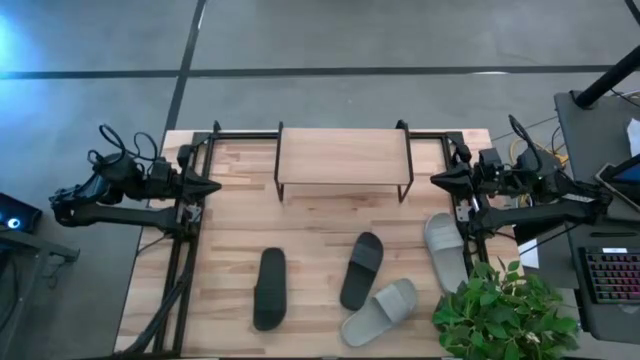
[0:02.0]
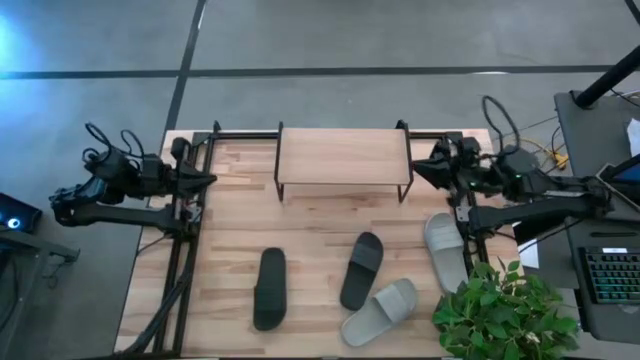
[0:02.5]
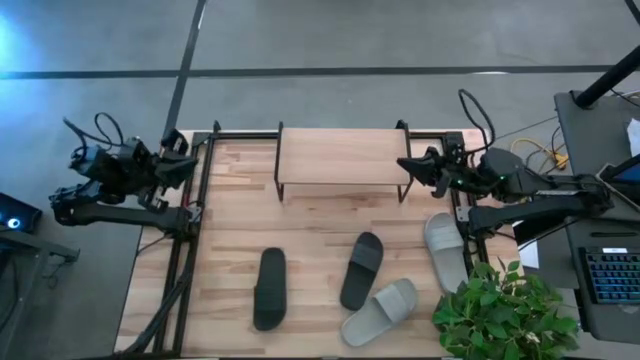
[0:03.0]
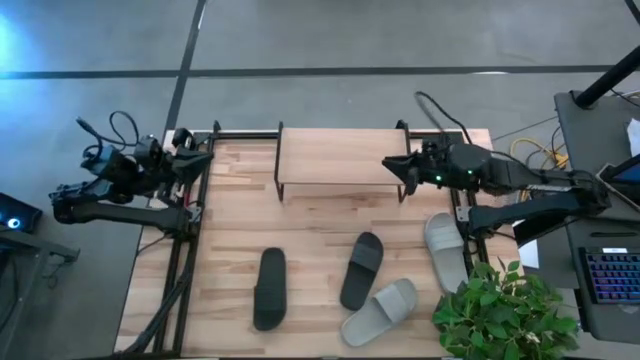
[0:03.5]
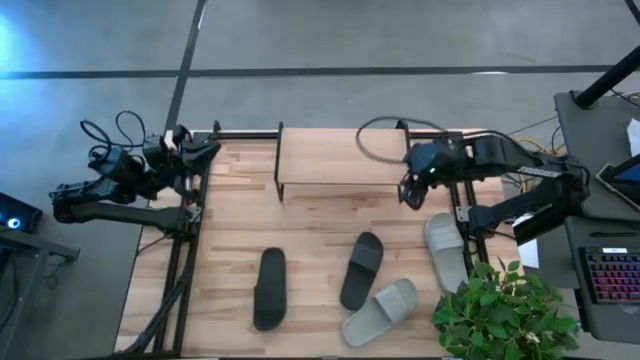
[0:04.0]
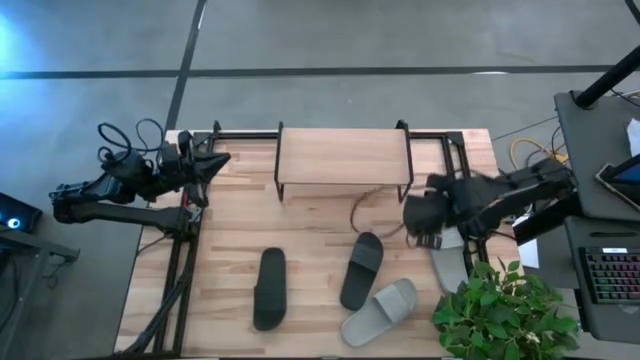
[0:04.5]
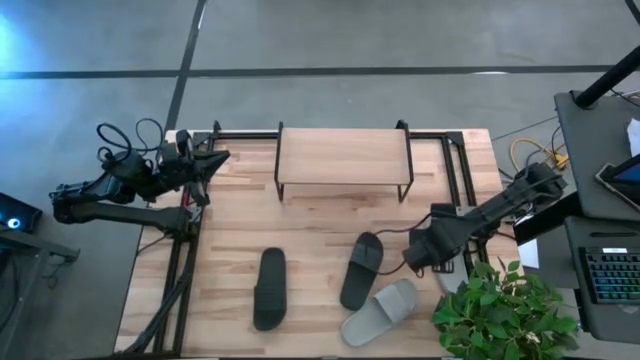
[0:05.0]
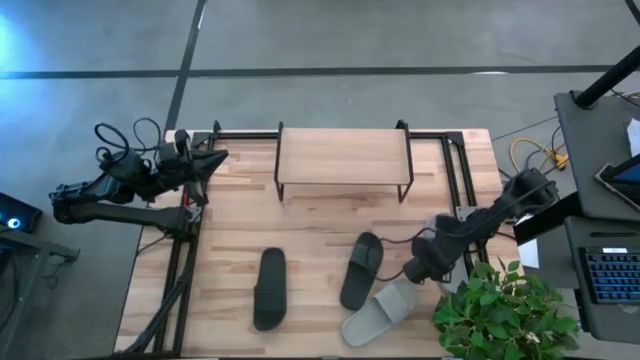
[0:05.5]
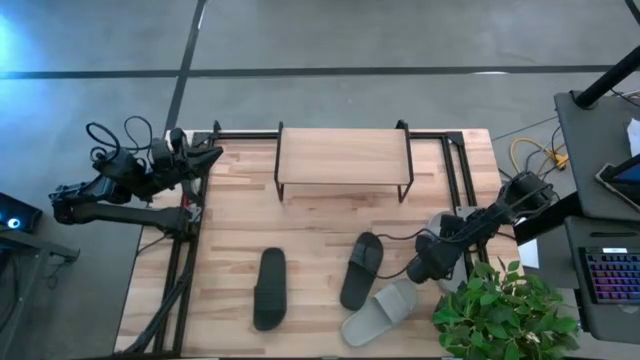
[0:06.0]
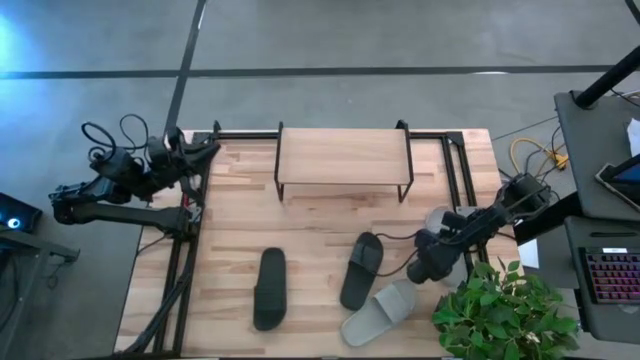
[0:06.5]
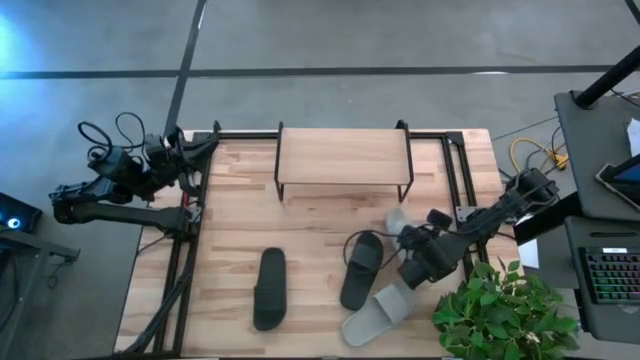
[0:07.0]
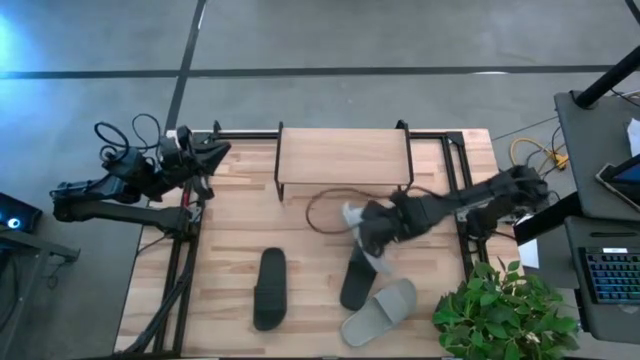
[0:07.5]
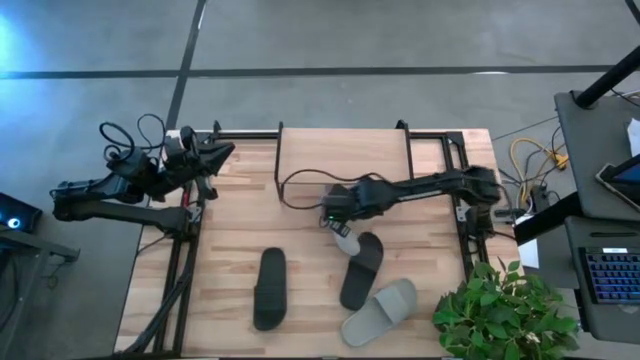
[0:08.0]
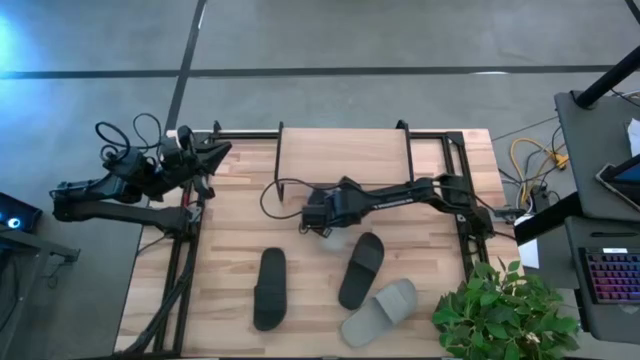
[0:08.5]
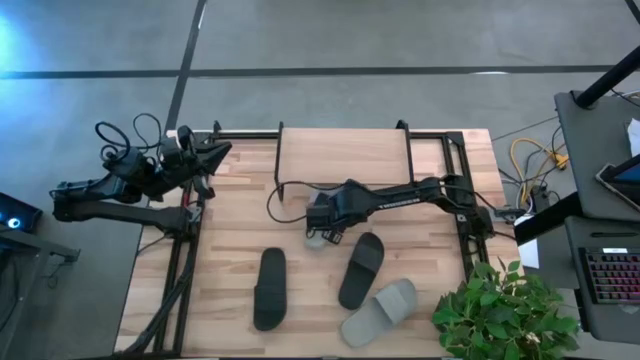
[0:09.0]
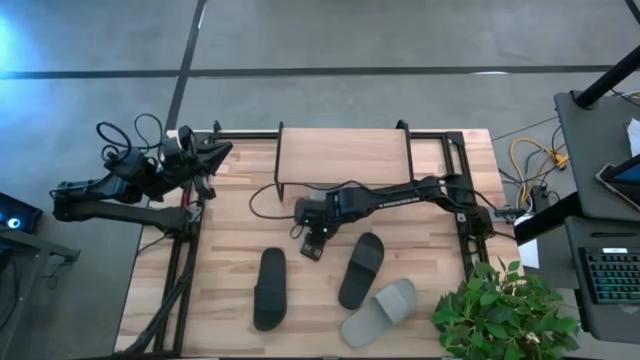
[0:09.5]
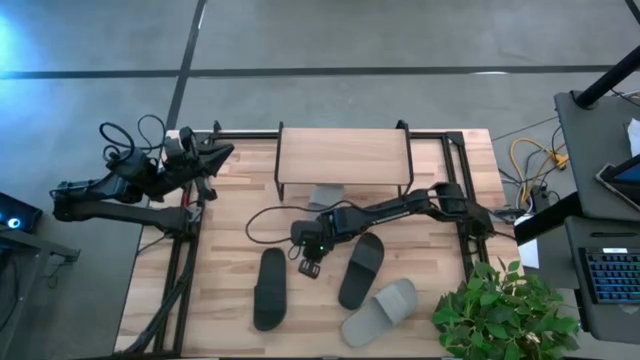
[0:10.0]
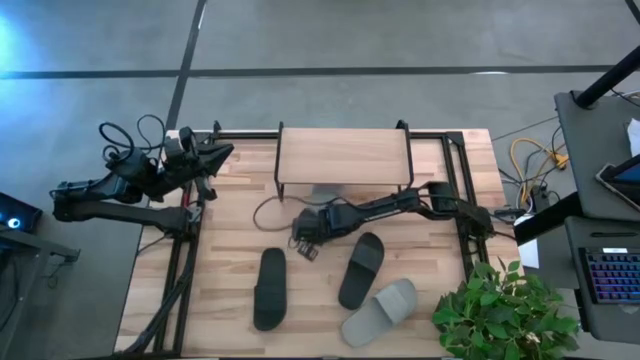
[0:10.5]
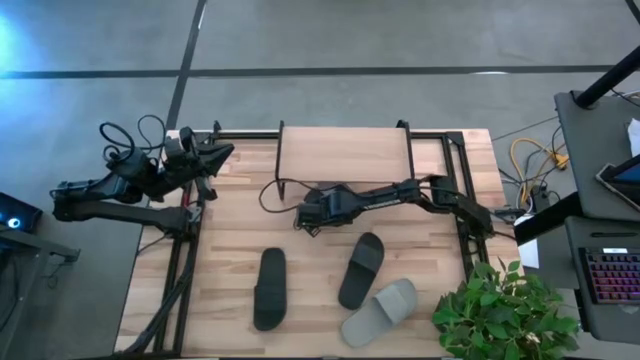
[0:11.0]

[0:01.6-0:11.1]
Task: Pick and place slides into the shelf
Put the right gray slide under the shelf

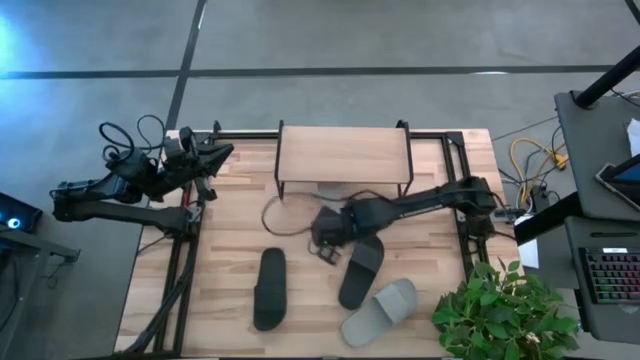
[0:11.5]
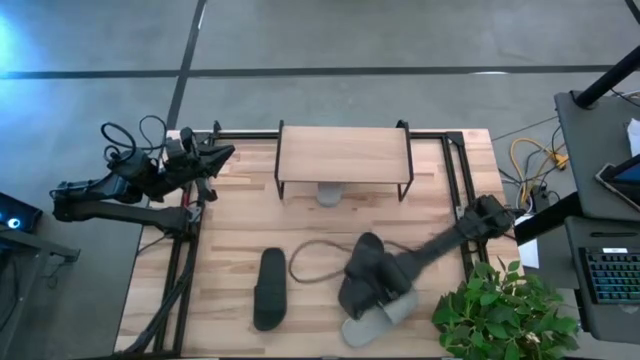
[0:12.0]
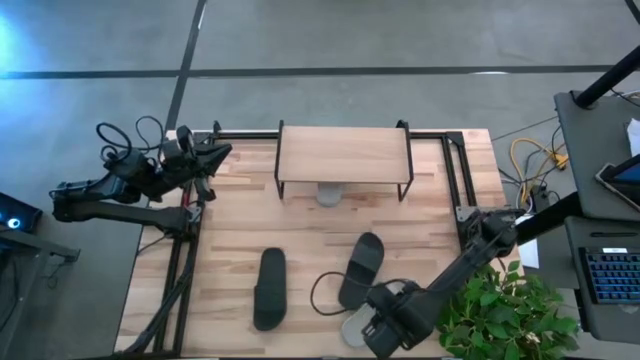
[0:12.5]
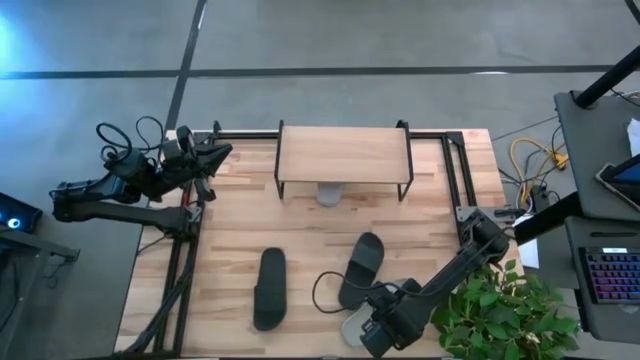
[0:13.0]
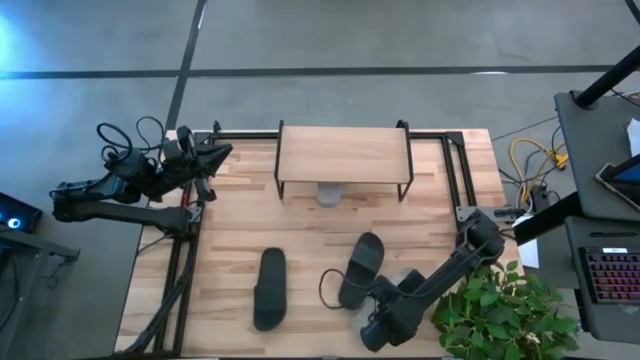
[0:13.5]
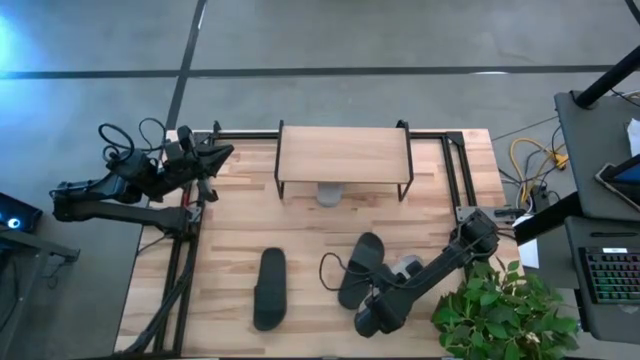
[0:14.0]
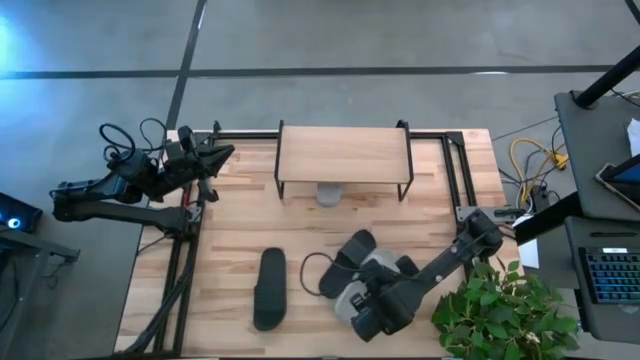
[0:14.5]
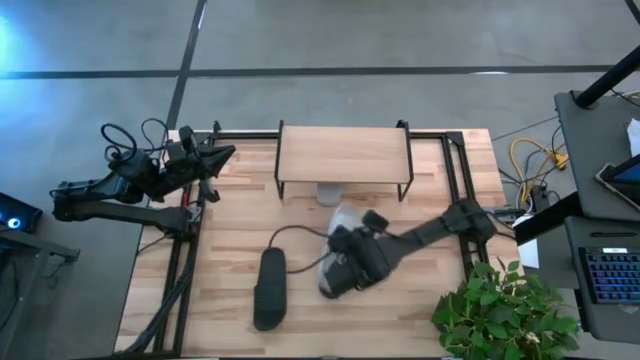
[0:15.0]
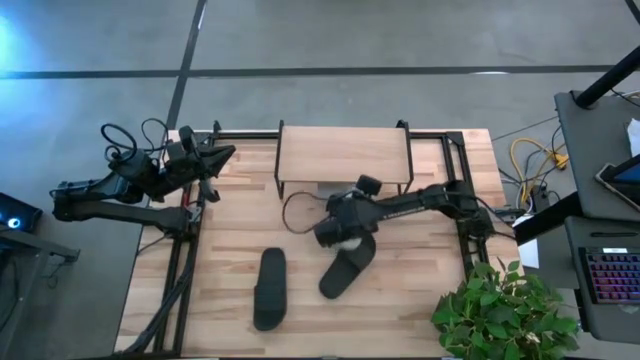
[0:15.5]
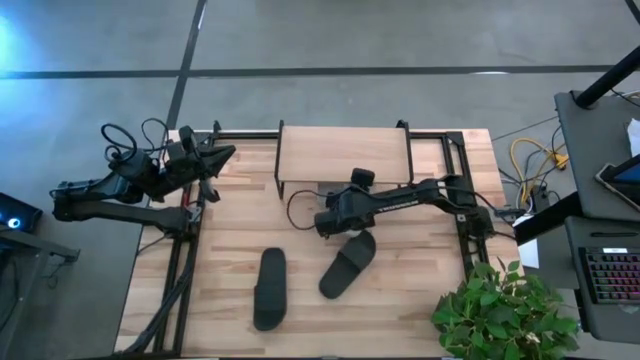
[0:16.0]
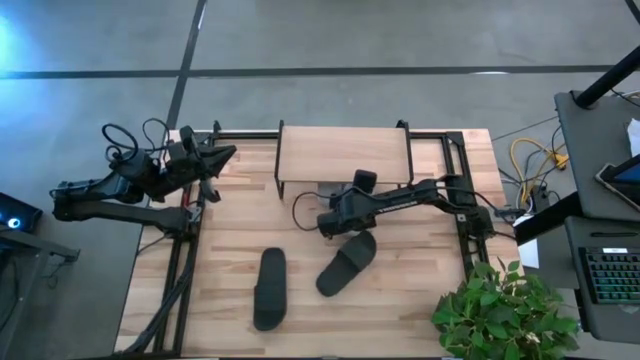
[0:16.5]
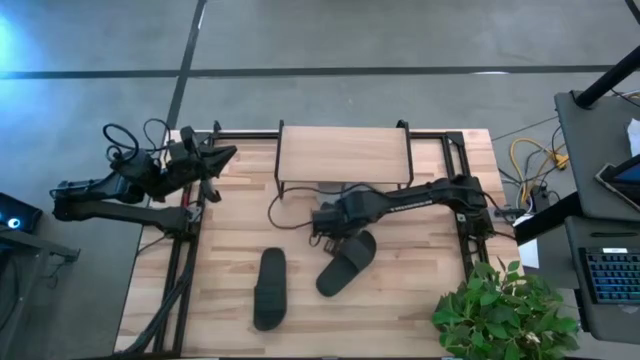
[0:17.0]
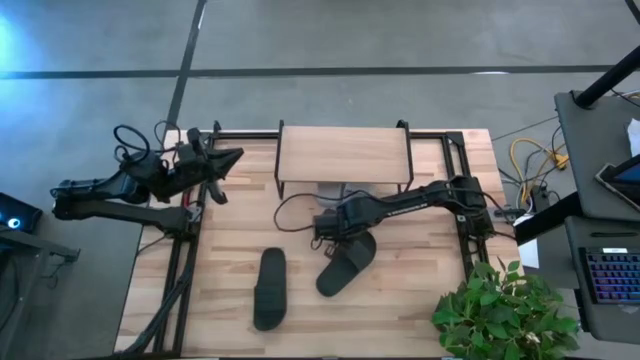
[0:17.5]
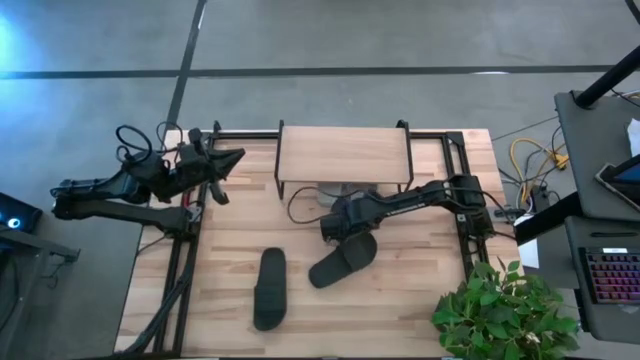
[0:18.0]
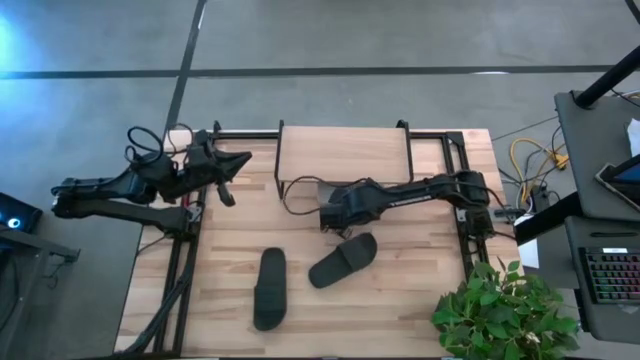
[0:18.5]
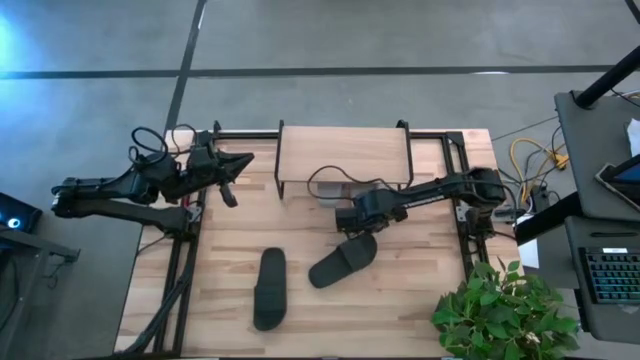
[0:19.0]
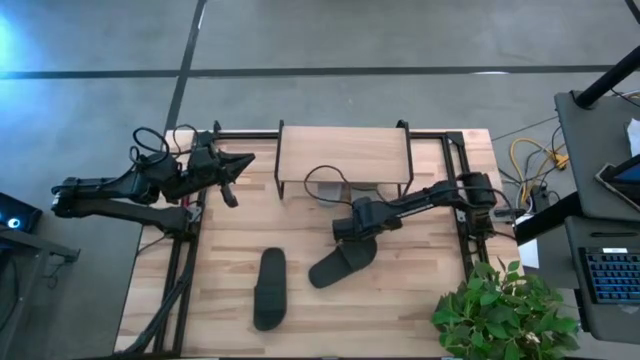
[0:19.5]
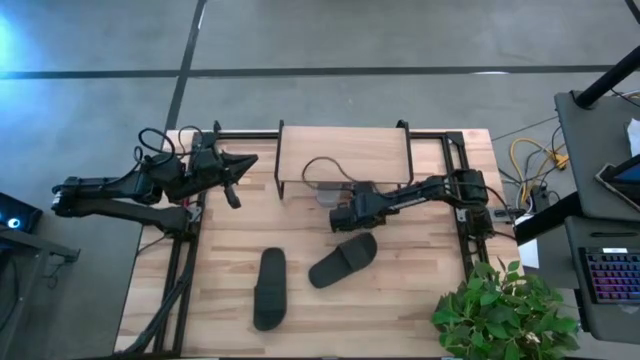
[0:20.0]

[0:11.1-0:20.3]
Put the gray slide under the shelf
